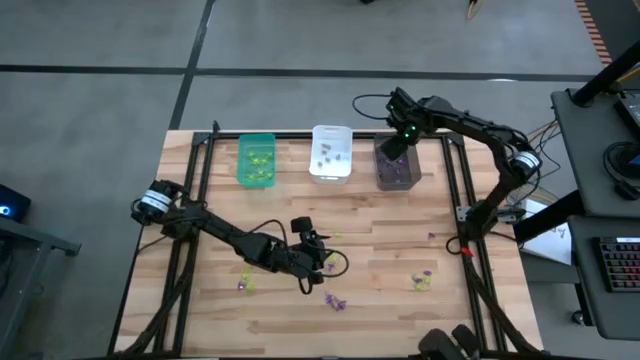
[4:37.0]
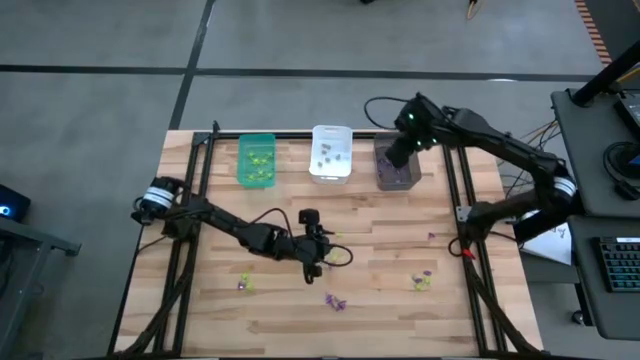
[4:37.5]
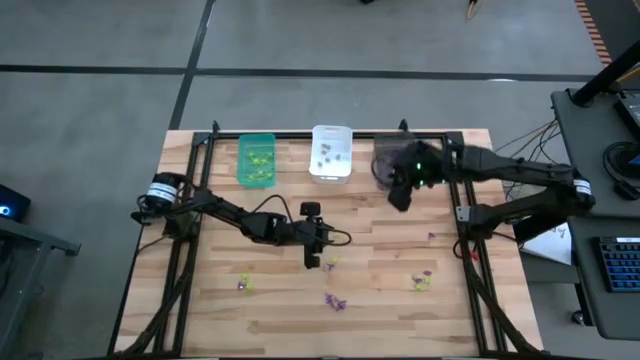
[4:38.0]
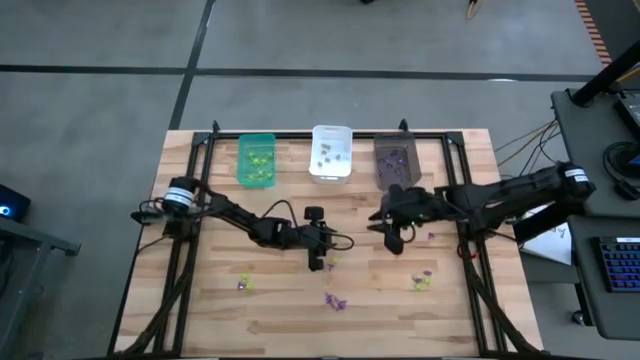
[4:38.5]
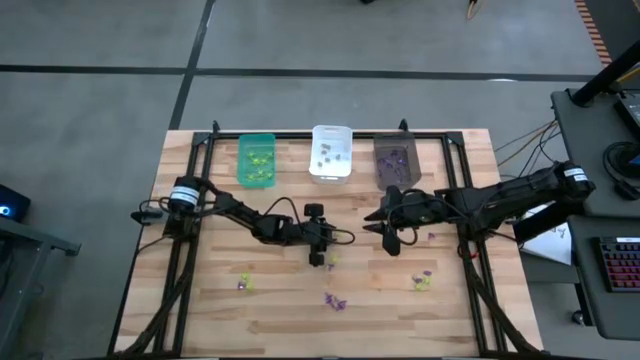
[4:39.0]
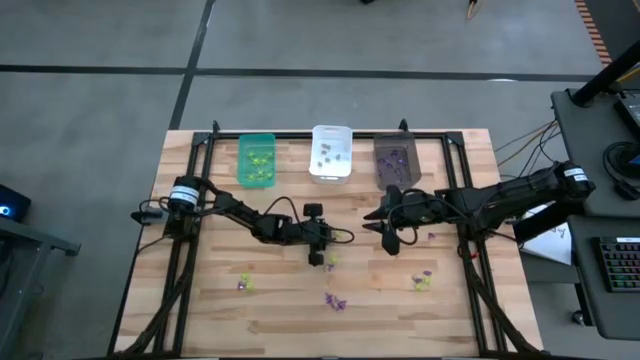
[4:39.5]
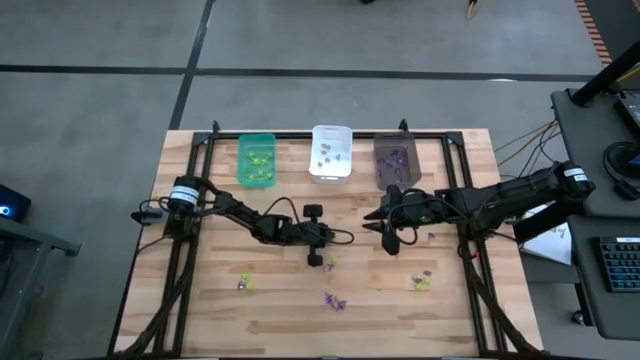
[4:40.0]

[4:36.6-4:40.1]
Task: Sort Halloween decoration
Put the green spider toy into the blue bin

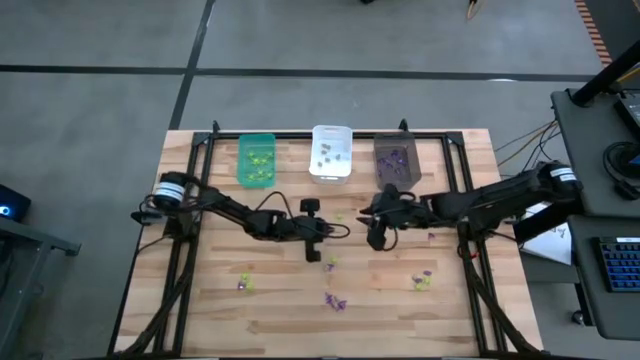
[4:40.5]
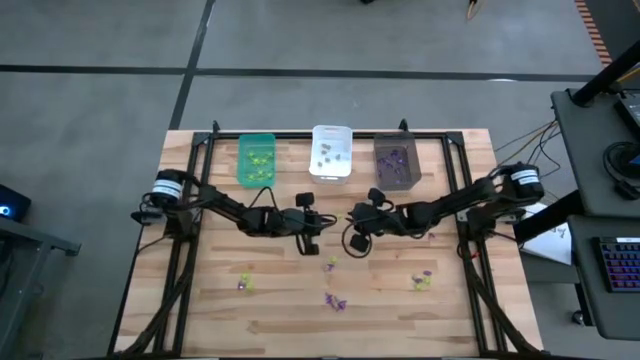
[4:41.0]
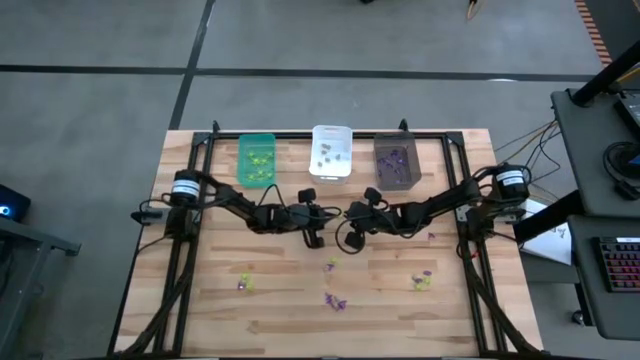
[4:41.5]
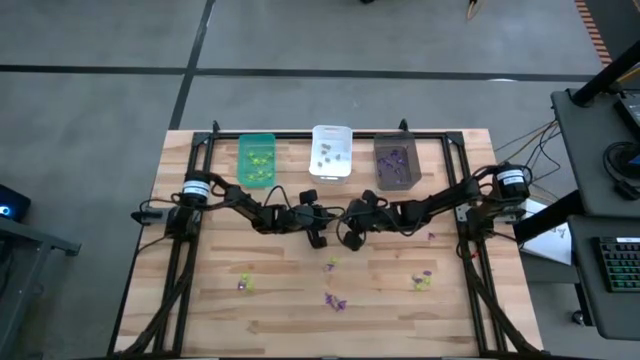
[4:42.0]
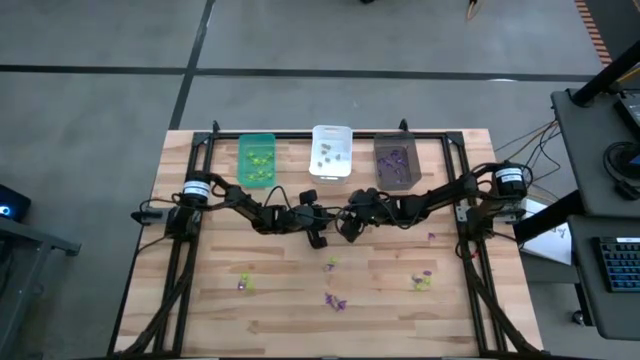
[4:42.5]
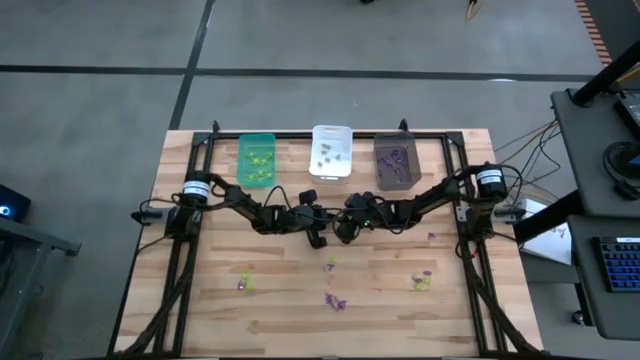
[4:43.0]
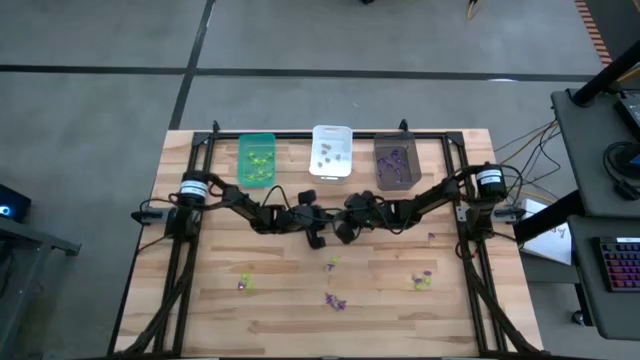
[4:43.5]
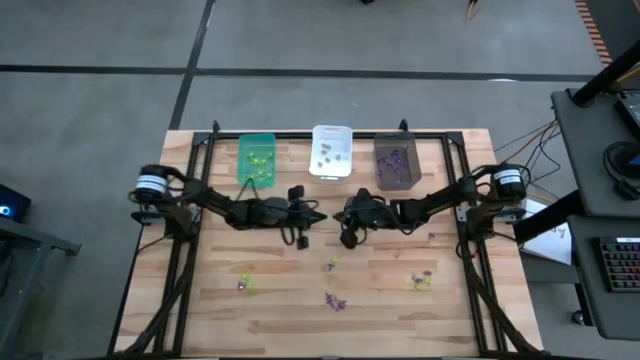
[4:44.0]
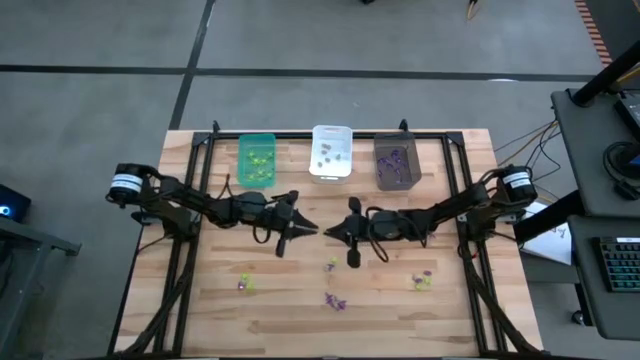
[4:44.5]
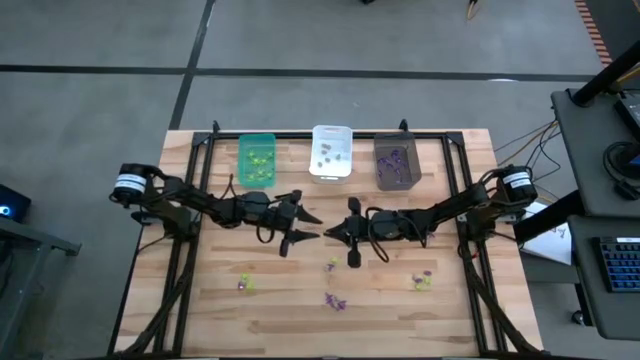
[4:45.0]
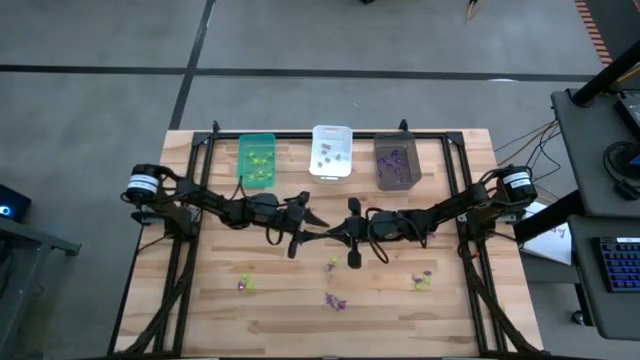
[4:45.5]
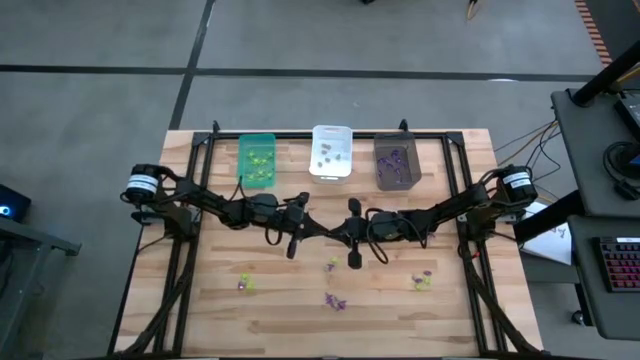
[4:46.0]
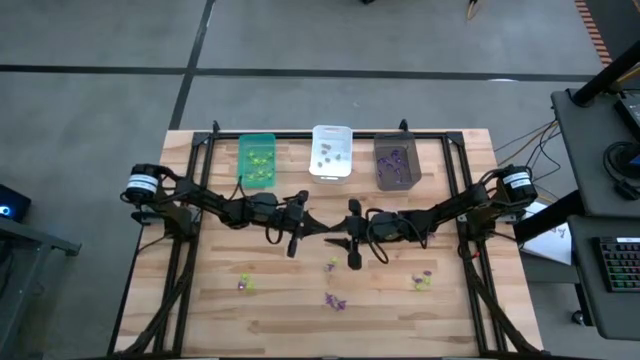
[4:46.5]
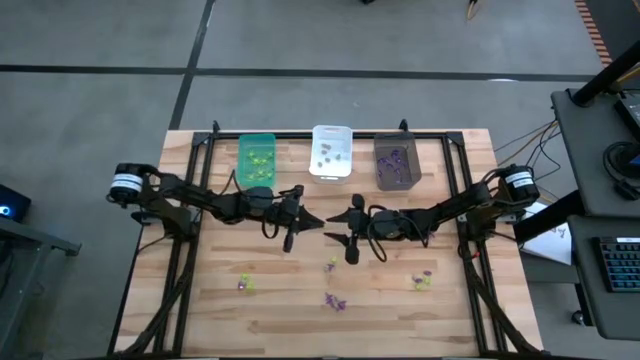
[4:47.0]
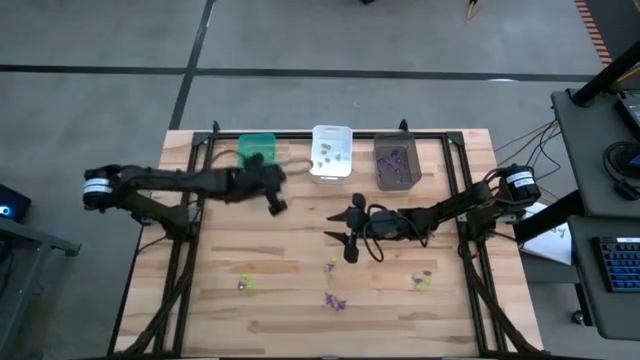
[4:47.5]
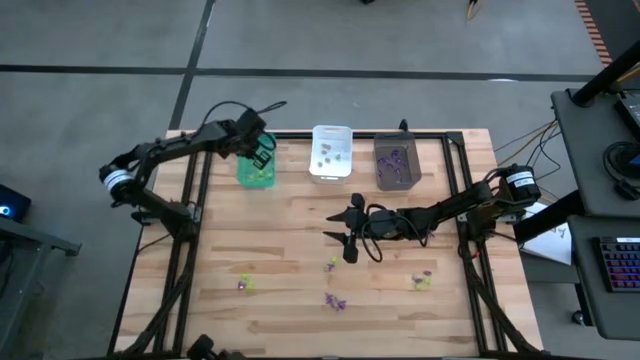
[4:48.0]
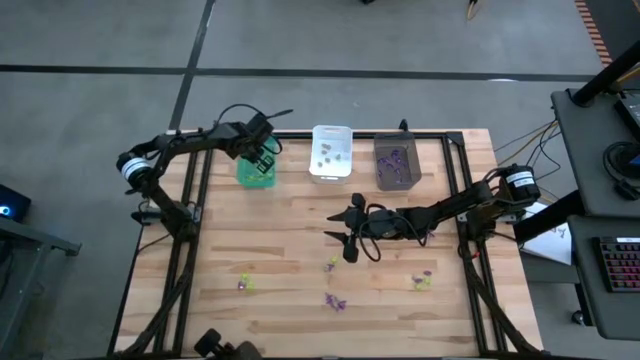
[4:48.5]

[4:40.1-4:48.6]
Put the green spider toy into the blue bin

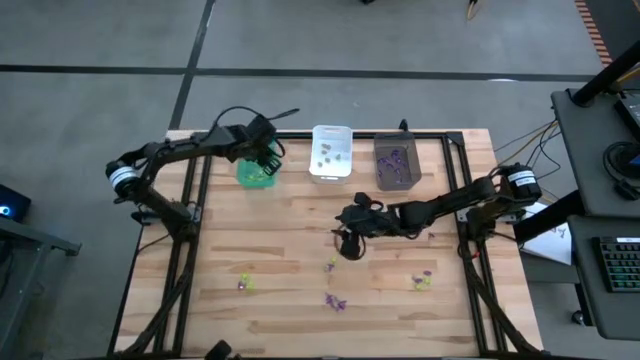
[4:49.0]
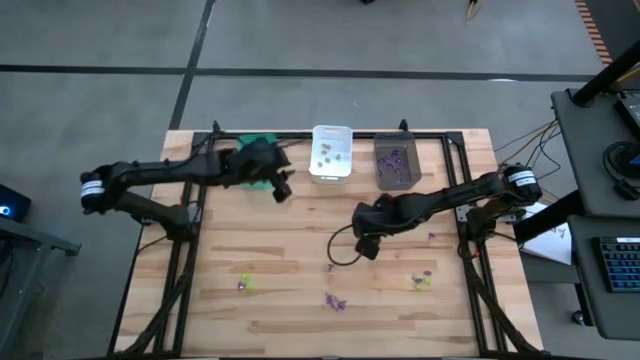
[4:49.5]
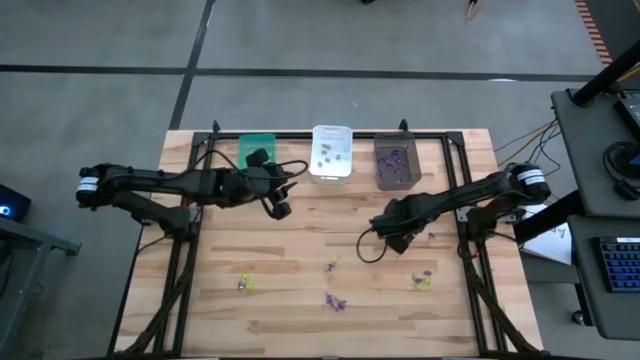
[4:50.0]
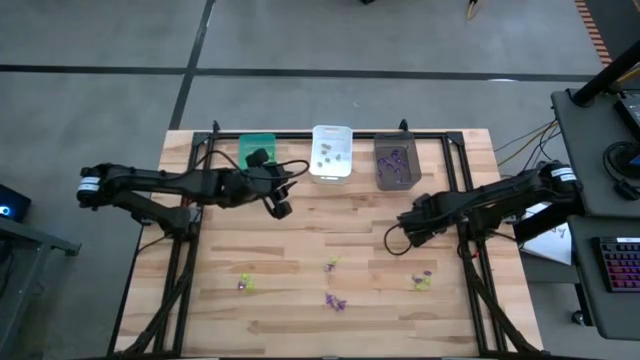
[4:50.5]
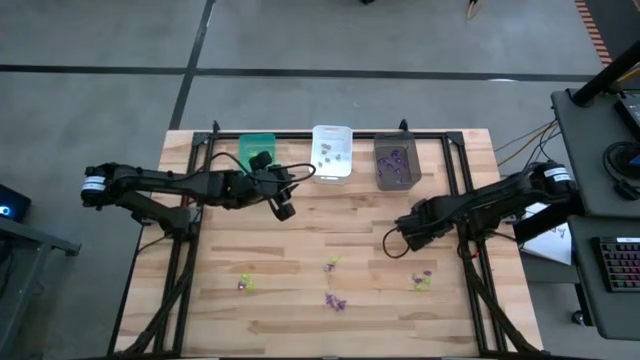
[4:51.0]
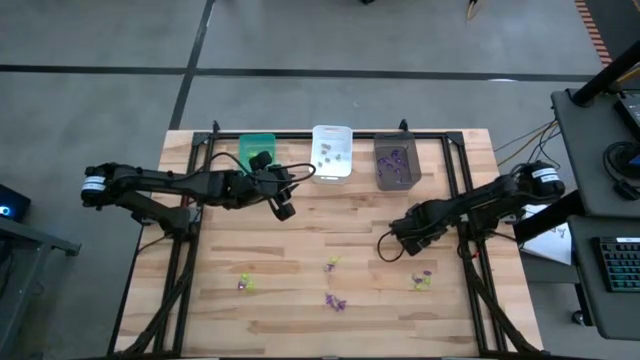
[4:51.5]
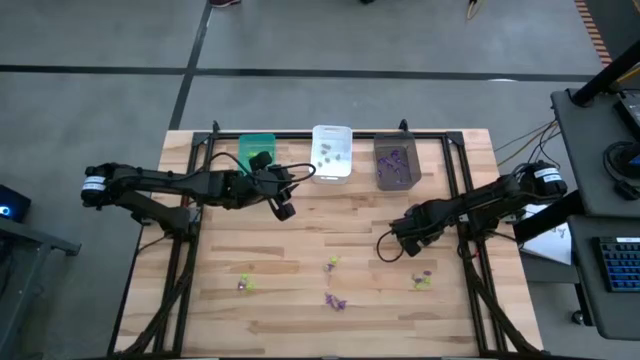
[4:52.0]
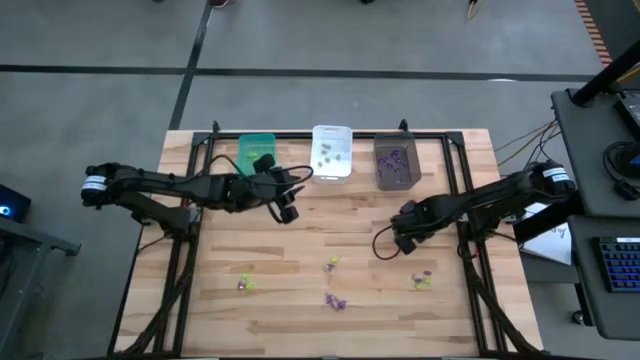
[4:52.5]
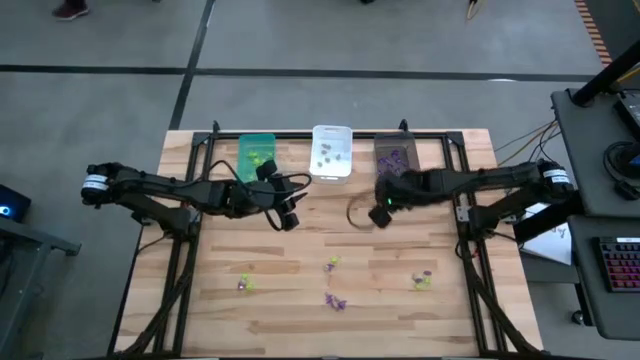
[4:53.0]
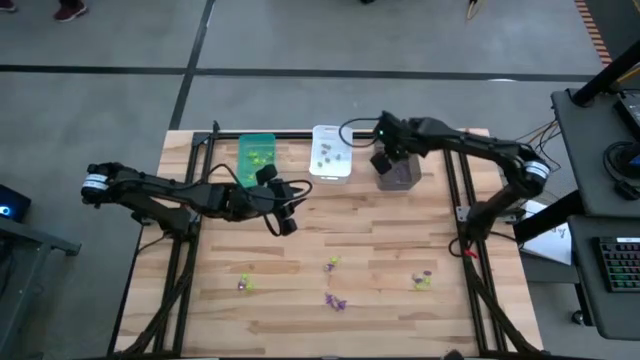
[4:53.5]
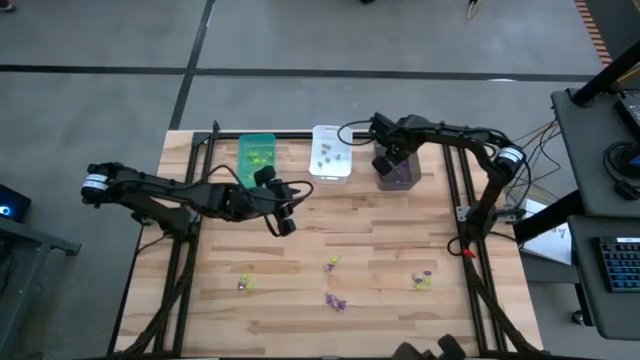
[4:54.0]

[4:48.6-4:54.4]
Put the purple witch hat toy into the gray bin

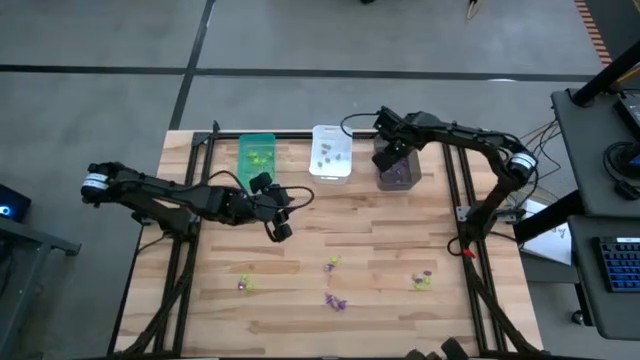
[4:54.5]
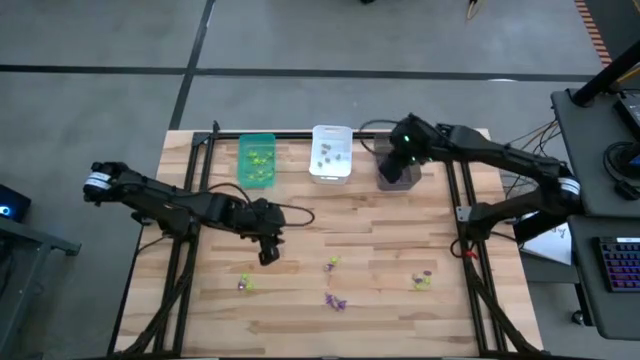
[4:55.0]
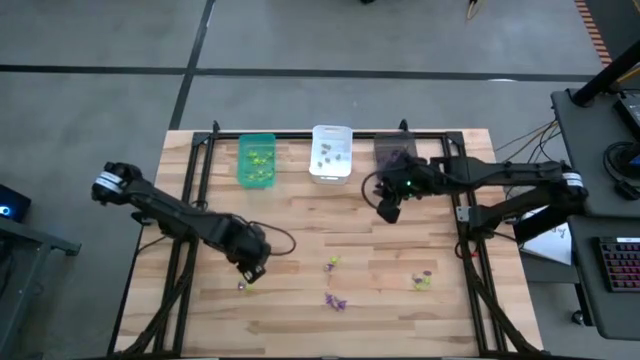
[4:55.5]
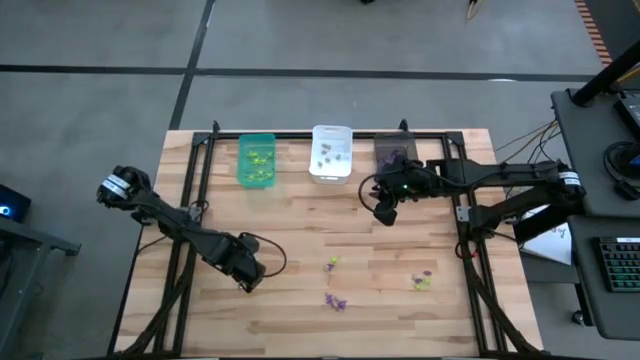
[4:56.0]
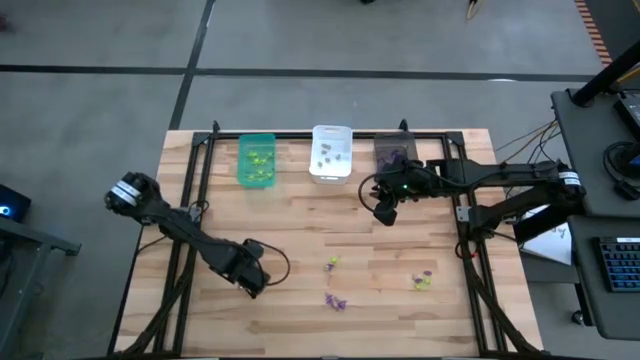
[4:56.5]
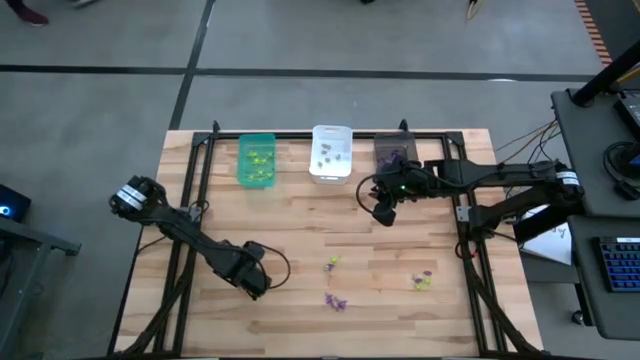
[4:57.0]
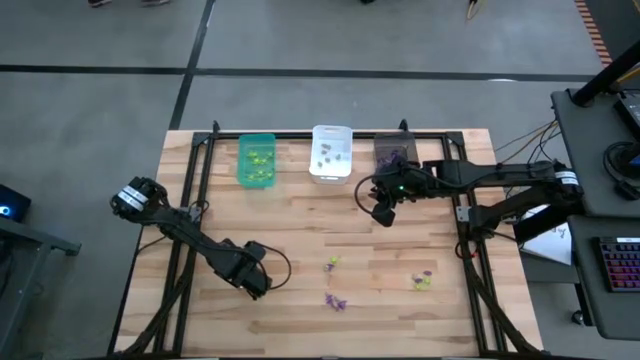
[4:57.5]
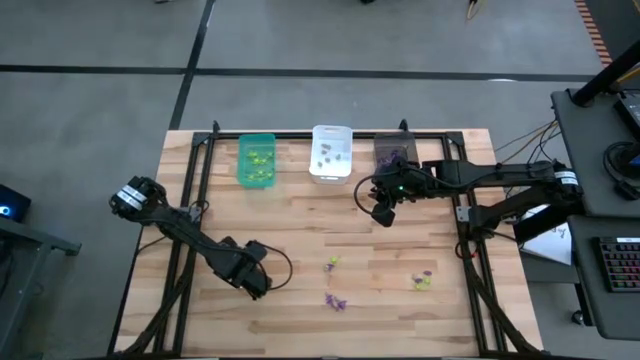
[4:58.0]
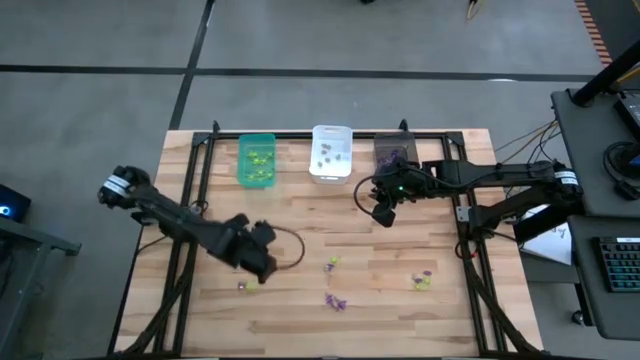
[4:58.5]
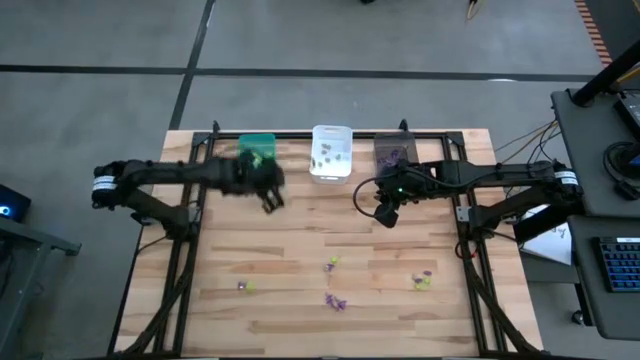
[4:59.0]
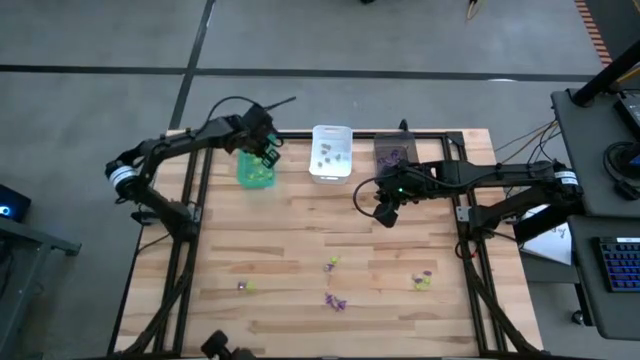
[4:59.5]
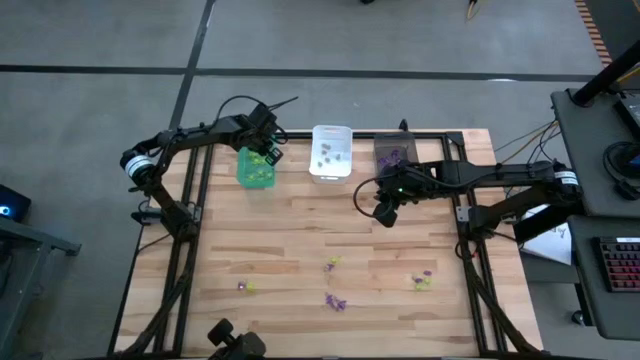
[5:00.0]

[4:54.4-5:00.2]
Put the green spider toy into the blue bin
